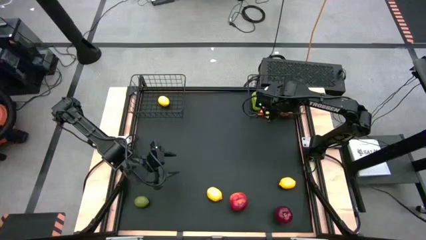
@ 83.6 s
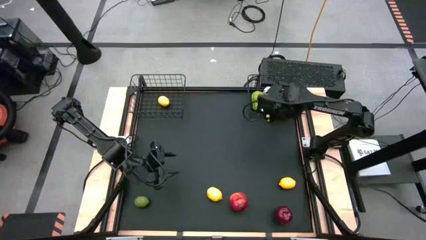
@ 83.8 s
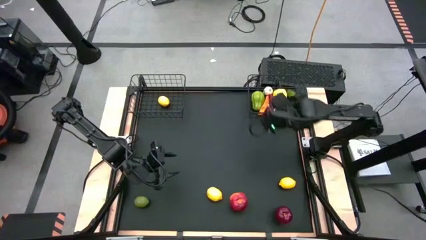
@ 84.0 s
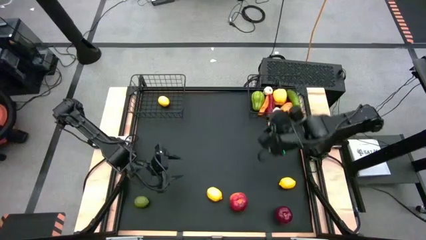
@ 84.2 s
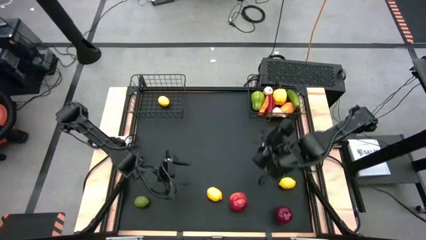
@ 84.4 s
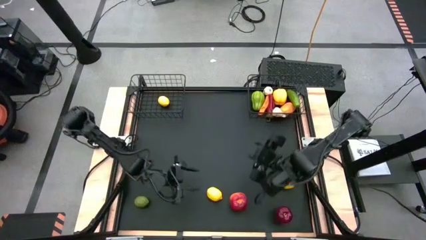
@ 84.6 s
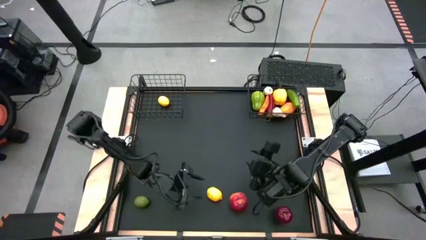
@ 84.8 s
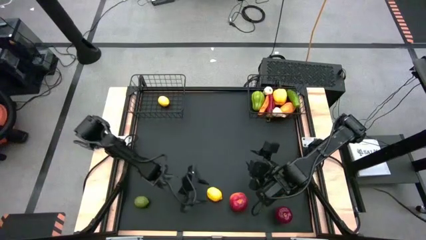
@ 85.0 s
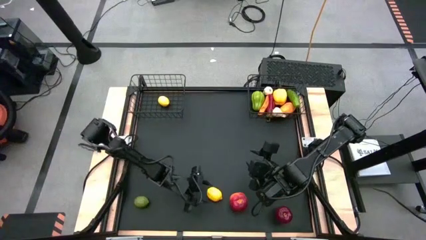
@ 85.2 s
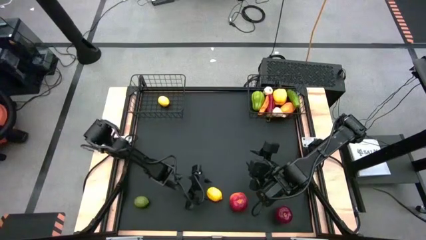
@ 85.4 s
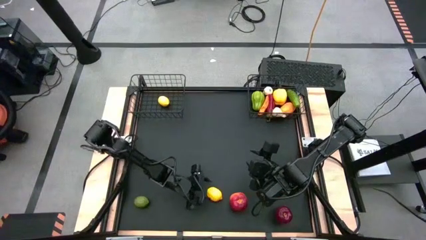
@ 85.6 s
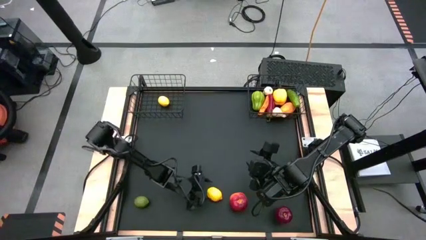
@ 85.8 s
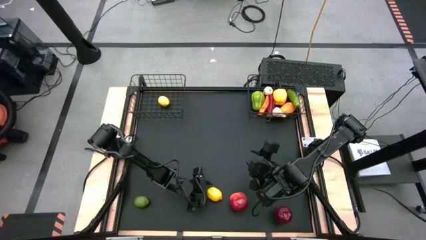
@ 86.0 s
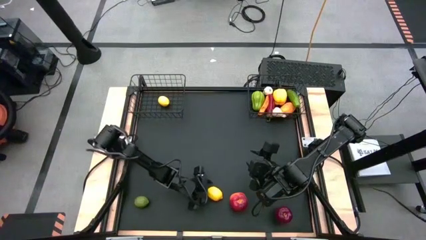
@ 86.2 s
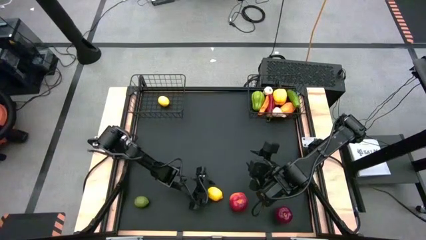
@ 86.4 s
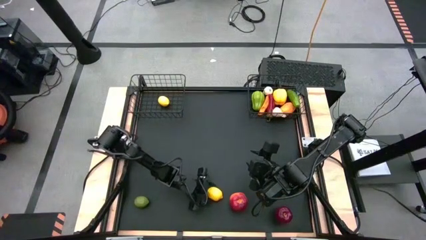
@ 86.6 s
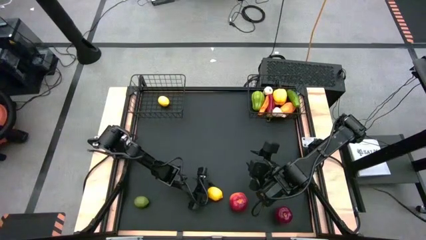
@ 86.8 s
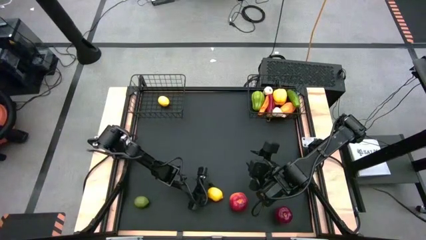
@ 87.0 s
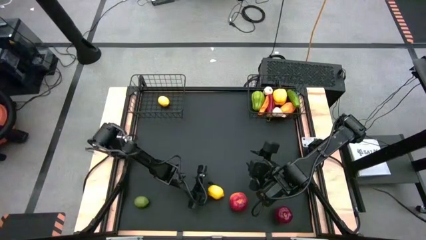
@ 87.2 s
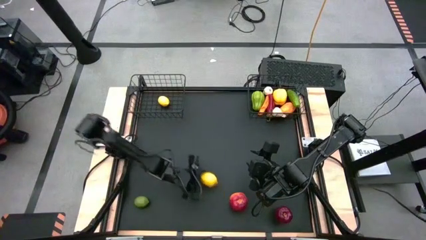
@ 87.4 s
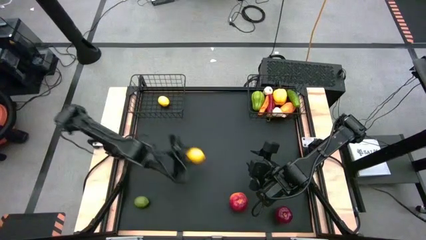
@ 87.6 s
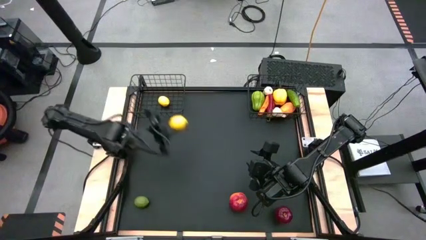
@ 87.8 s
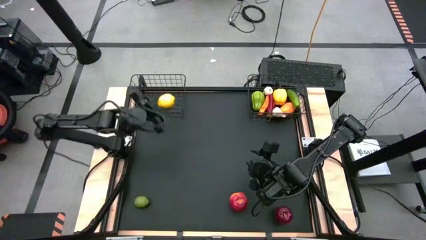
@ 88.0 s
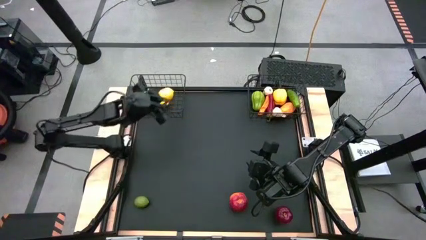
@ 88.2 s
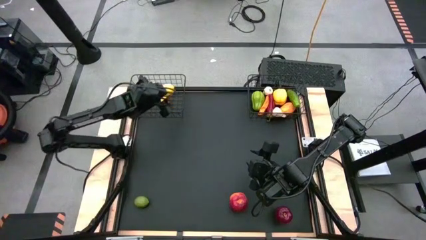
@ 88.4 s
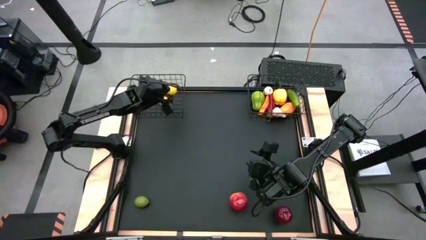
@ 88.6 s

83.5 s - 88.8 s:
Task: Sort produce into baskets
Put the left yellow lemon into the left black wire basket

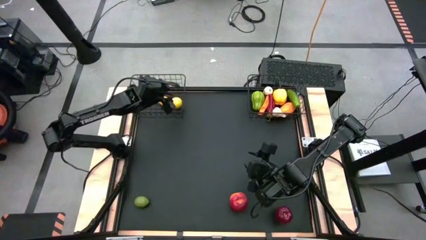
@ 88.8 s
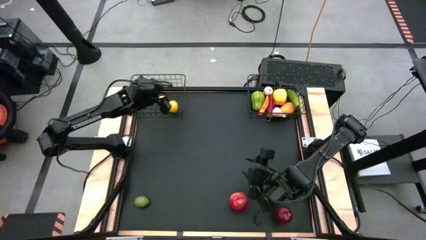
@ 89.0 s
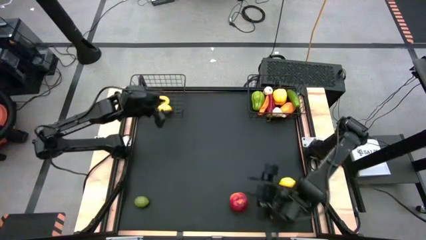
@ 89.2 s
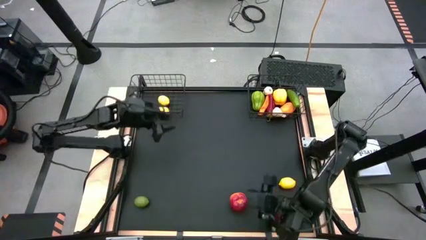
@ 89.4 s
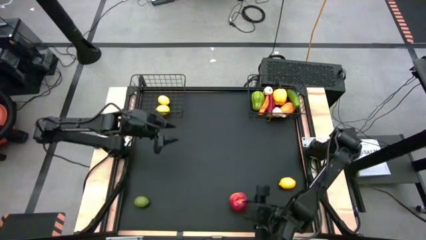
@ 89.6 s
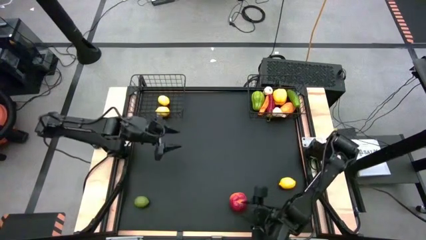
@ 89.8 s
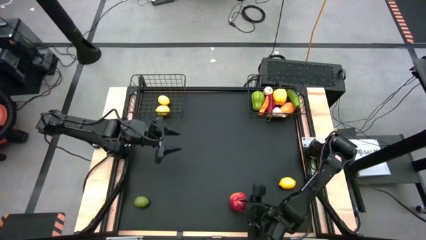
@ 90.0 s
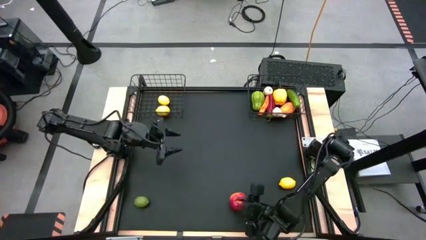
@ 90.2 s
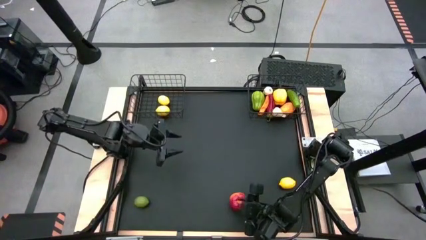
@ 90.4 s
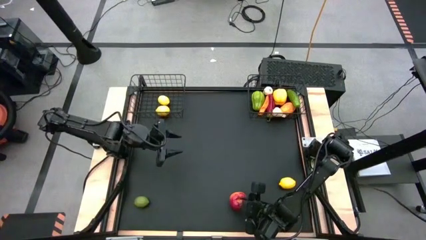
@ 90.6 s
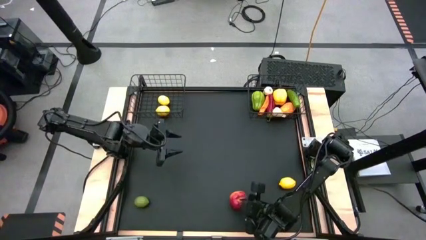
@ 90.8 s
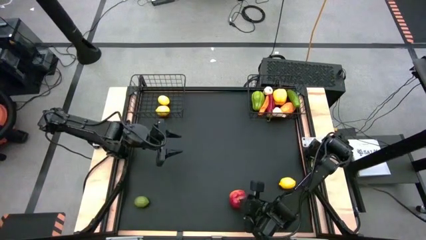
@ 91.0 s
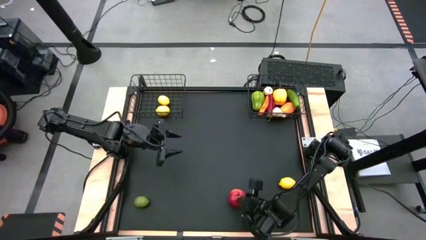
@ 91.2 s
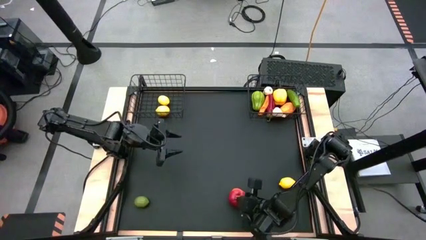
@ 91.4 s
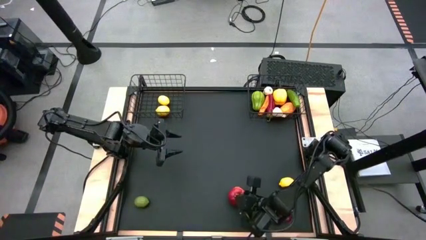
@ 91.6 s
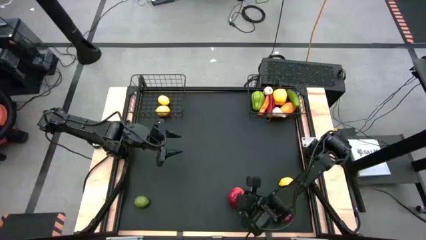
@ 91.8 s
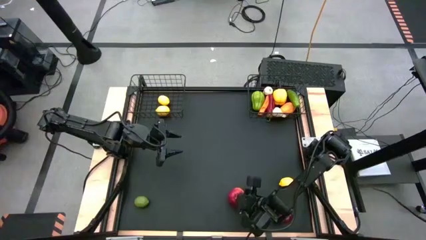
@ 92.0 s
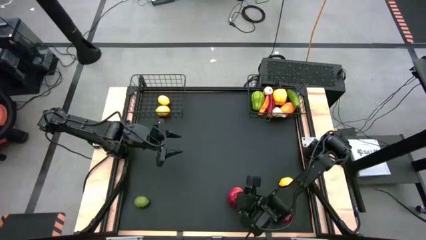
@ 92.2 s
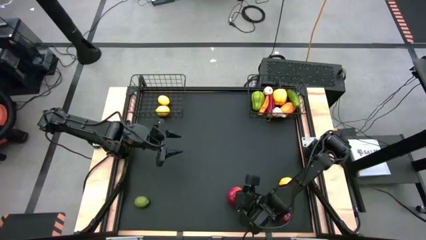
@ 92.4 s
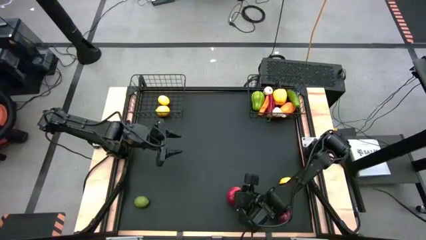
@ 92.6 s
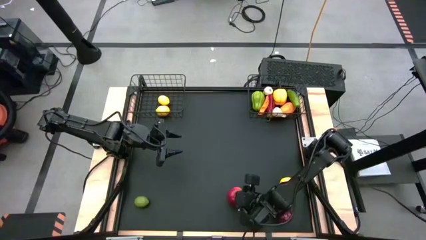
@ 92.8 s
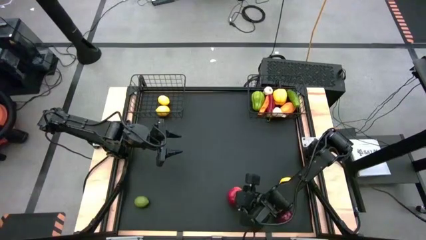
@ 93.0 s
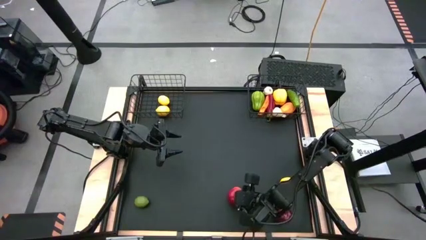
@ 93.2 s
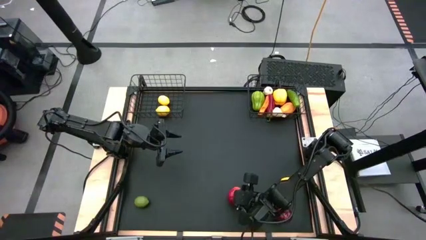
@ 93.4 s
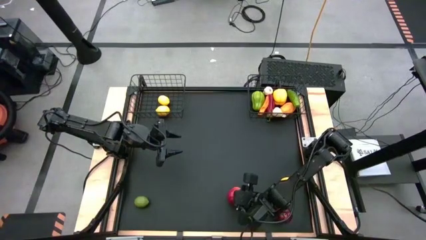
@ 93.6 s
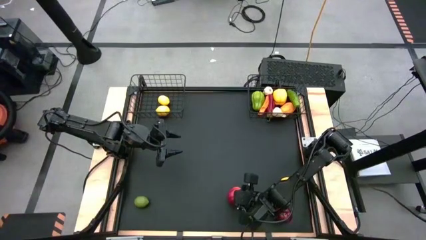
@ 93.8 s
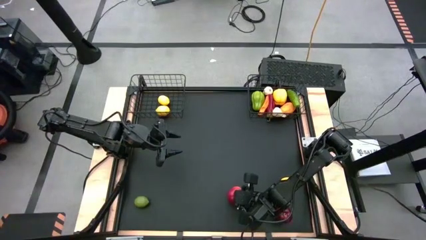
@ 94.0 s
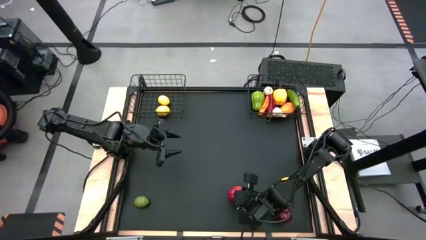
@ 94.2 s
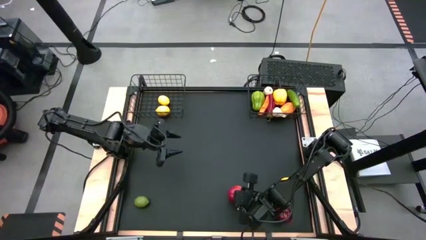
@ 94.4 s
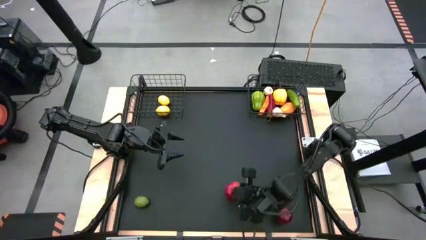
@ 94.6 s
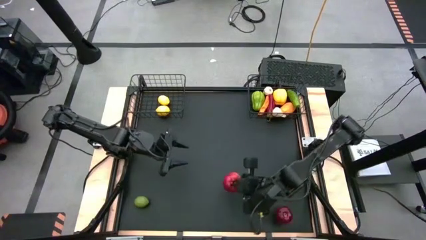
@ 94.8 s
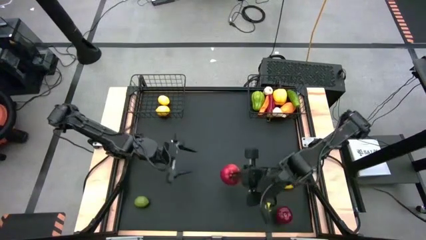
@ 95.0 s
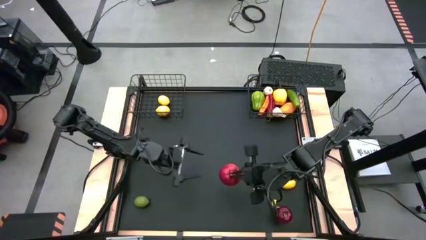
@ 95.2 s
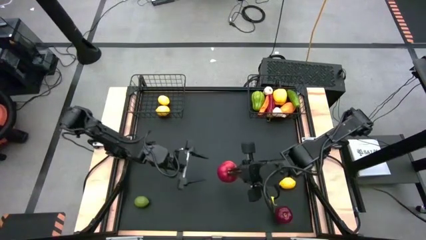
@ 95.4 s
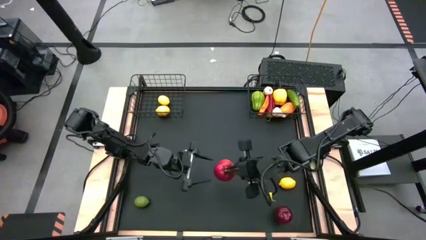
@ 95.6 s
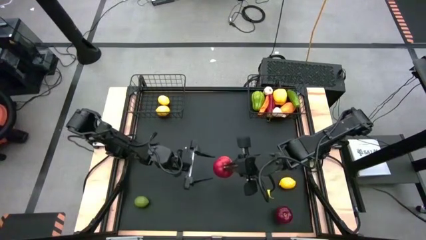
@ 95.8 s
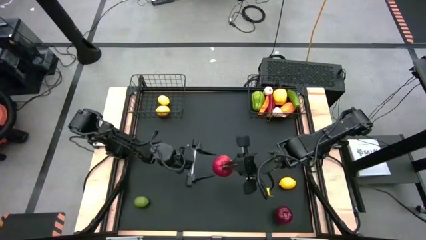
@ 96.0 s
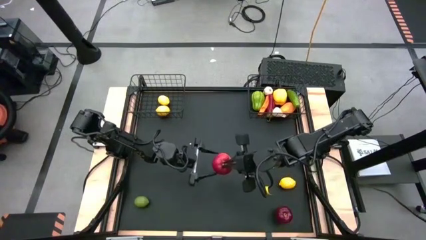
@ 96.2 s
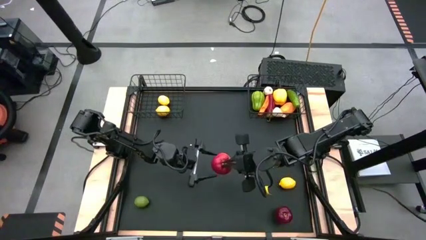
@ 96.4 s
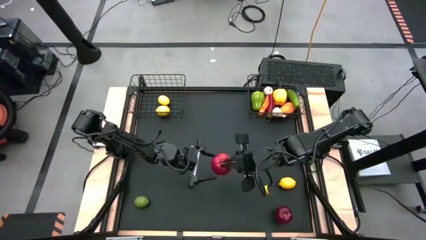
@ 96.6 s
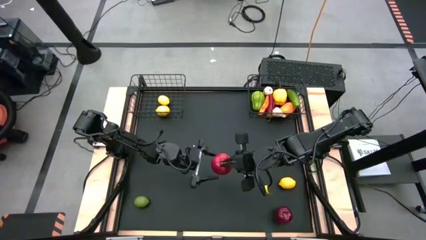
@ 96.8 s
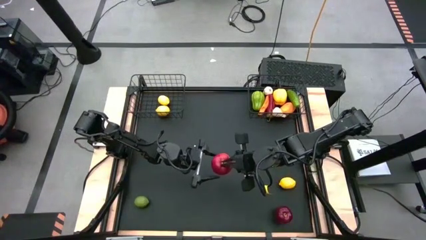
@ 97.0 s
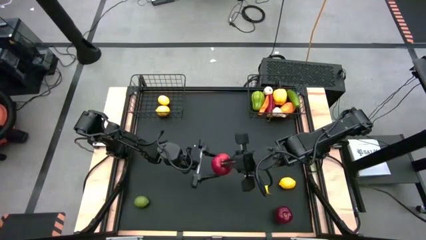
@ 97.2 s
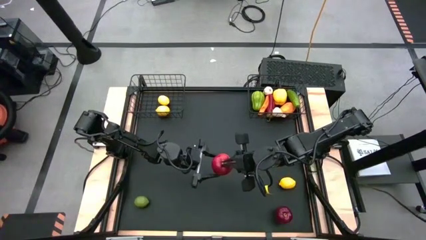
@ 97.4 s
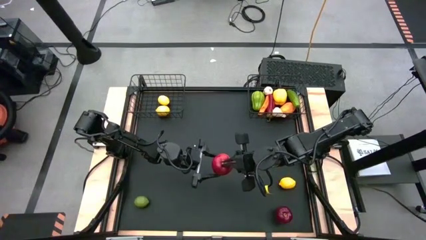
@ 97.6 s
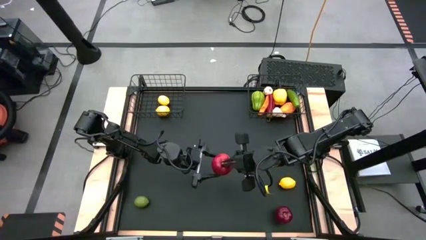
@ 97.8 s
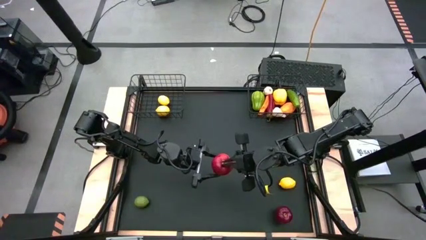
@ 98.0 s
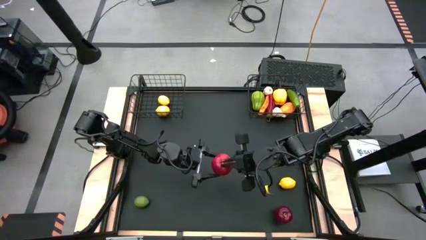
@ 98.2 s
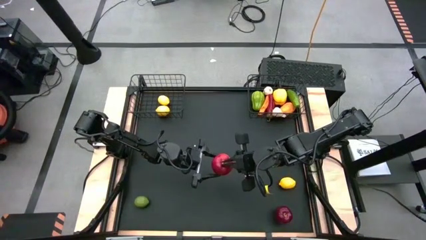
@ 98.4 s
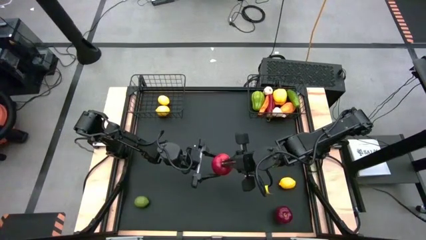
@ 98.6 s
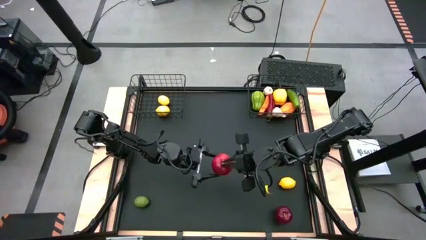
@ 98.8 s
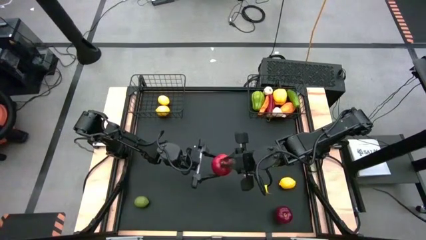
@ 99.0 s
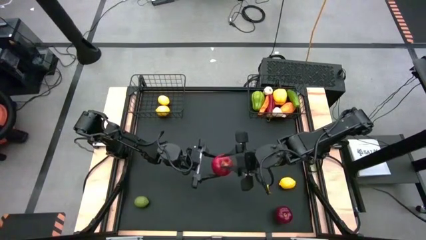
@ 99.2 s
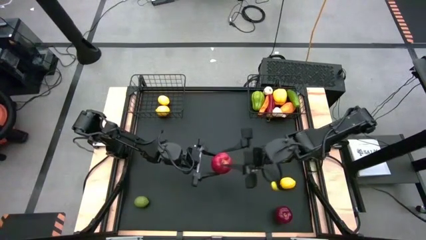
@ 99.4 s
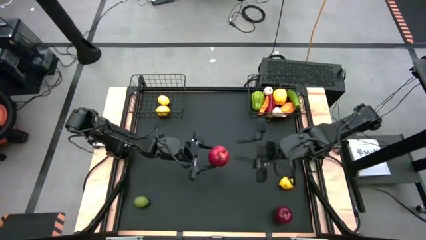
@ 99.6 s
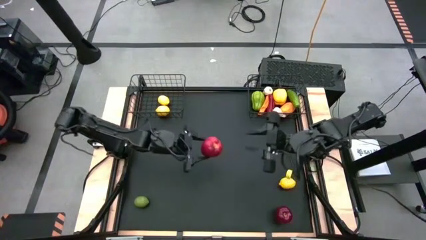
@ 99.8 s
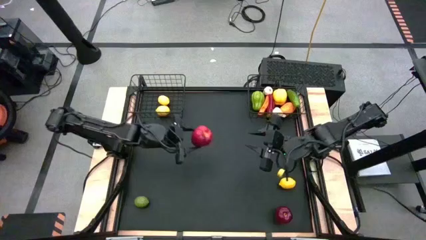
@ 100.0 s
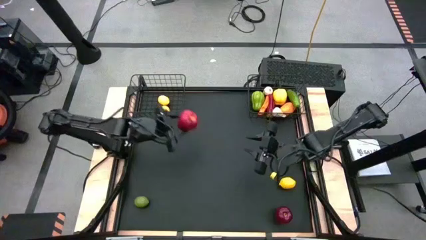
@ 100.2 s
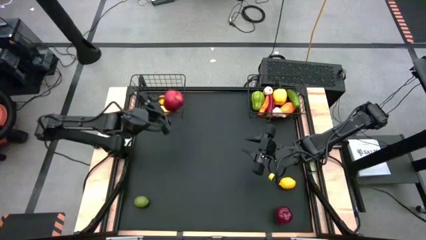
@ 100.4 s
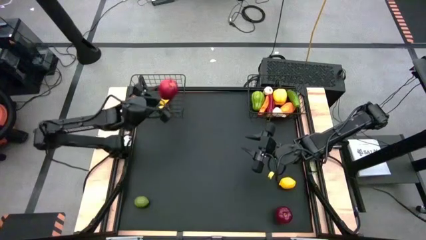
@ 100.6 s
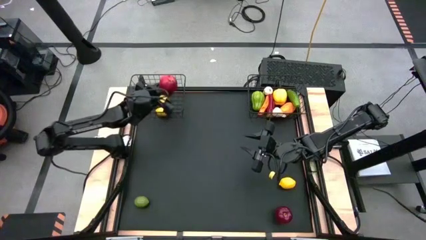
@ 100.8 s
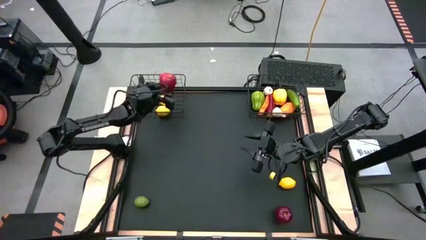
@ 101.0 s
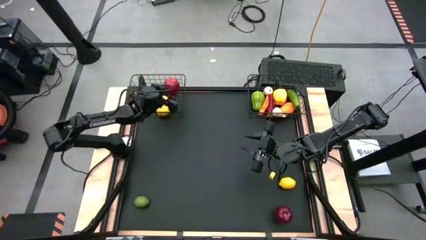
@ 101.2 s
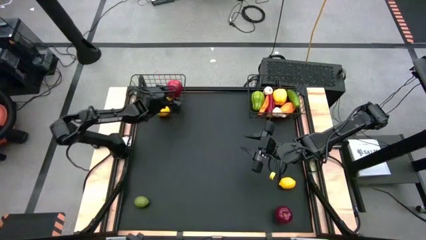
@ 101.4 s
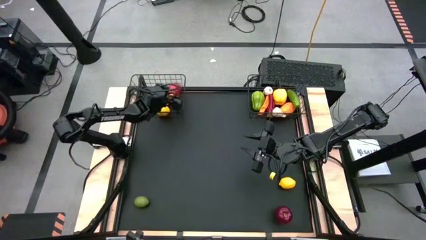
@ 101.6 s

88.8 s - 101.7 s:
Put the left red apple into the left black wire basket
